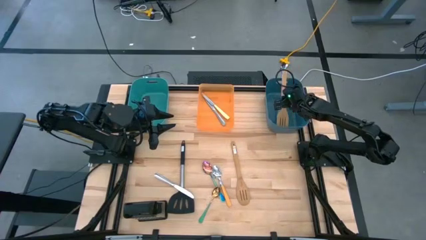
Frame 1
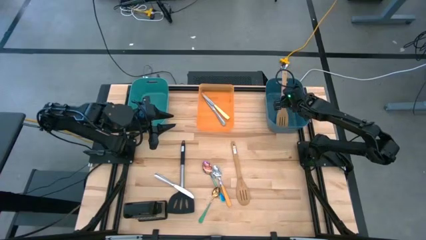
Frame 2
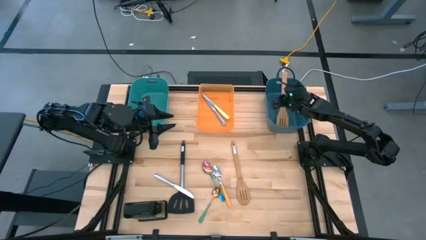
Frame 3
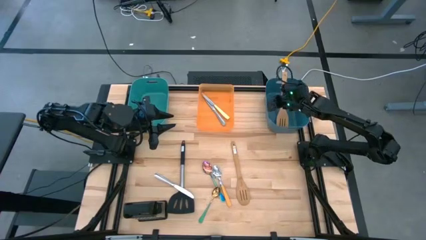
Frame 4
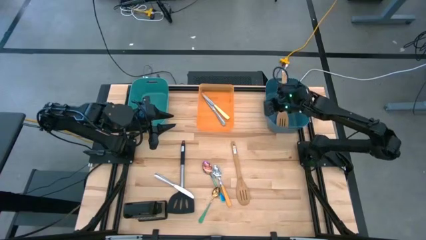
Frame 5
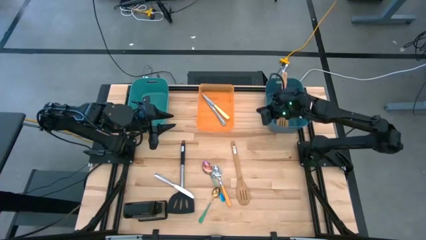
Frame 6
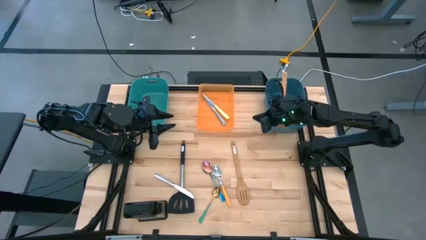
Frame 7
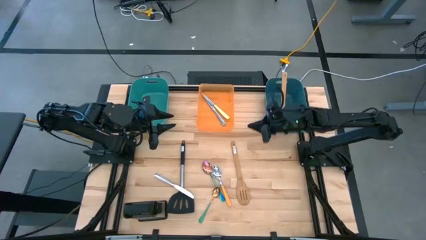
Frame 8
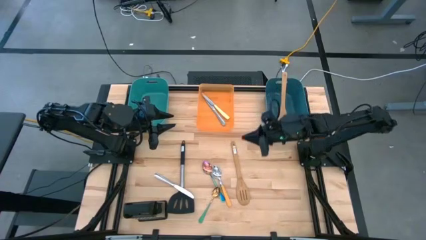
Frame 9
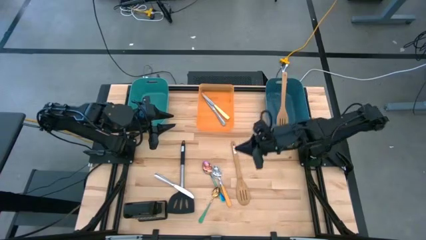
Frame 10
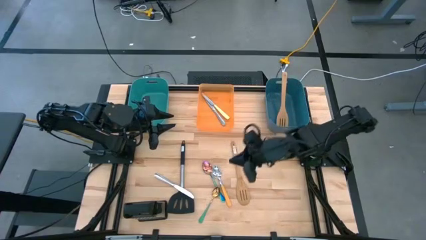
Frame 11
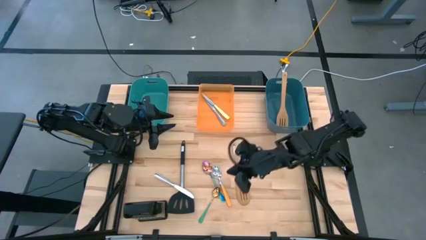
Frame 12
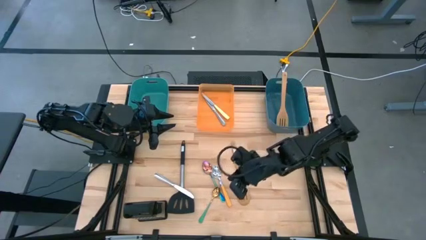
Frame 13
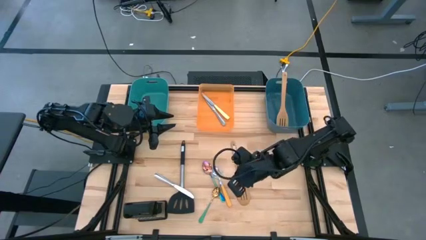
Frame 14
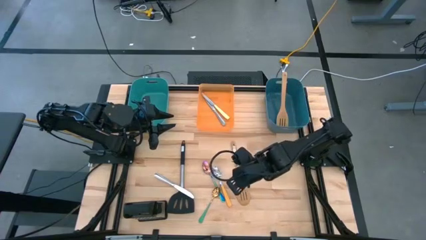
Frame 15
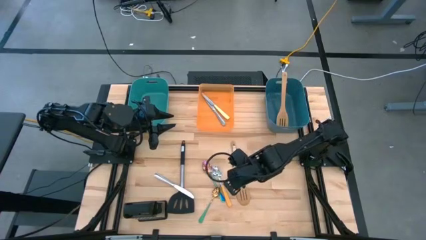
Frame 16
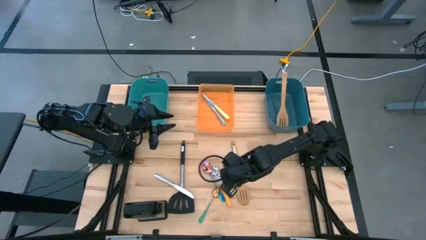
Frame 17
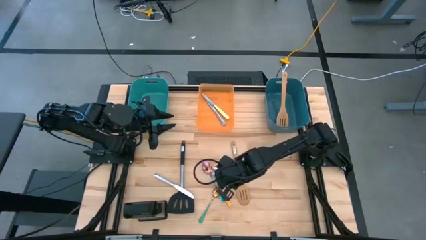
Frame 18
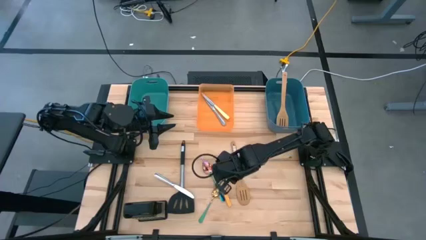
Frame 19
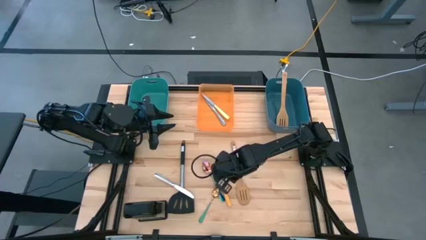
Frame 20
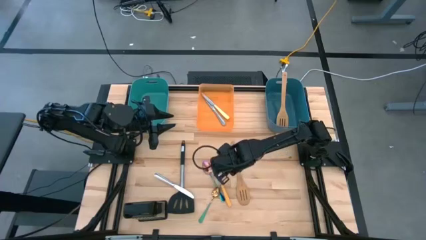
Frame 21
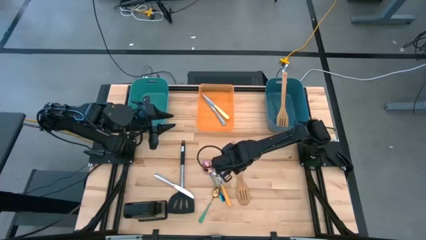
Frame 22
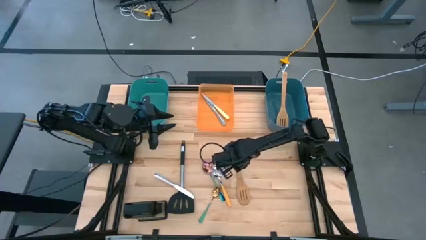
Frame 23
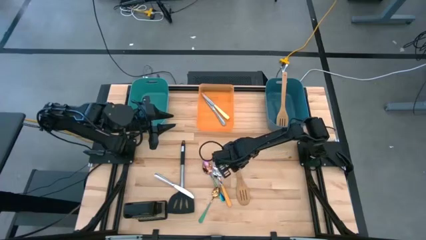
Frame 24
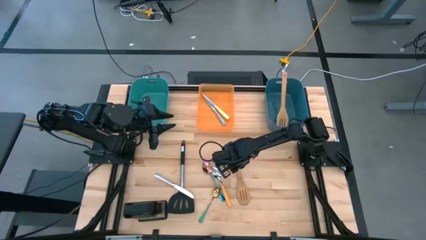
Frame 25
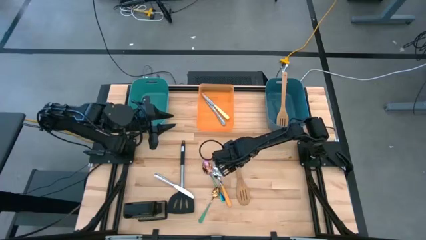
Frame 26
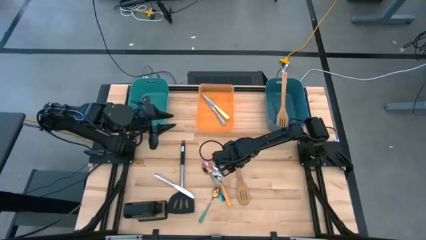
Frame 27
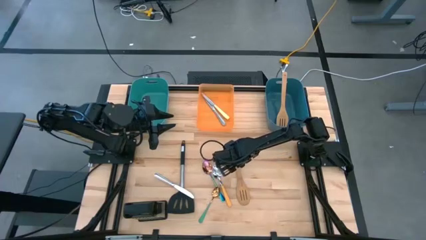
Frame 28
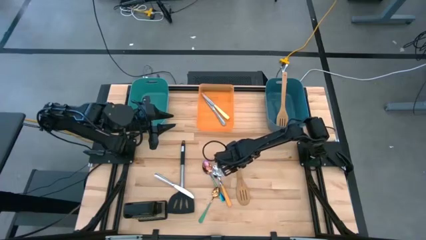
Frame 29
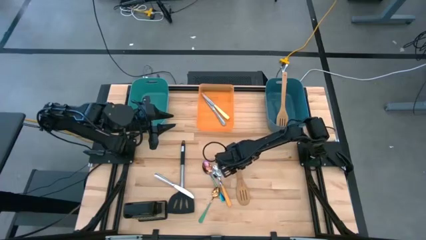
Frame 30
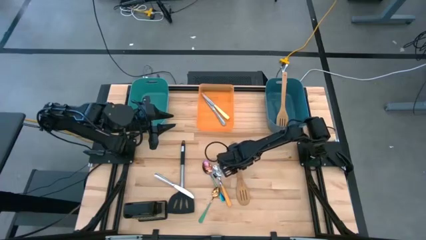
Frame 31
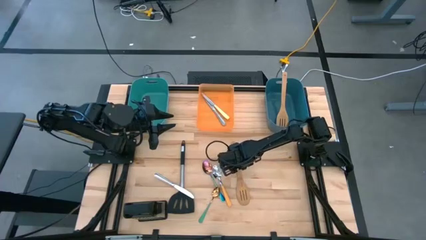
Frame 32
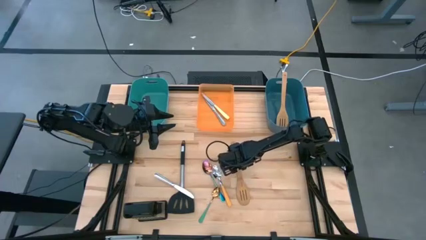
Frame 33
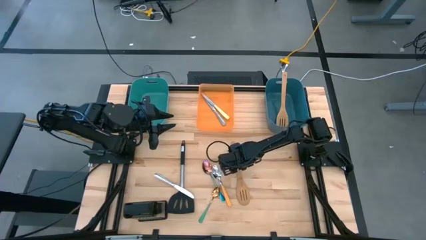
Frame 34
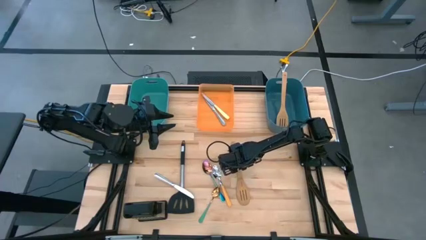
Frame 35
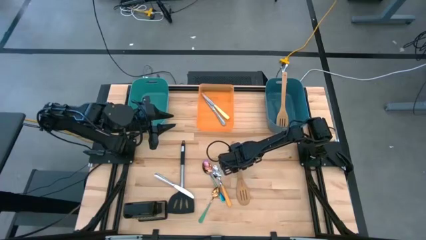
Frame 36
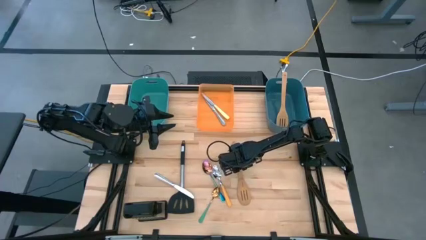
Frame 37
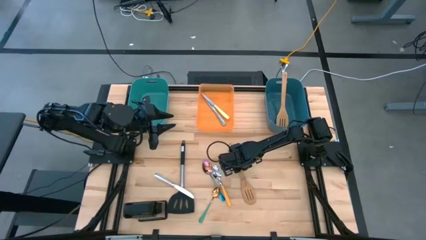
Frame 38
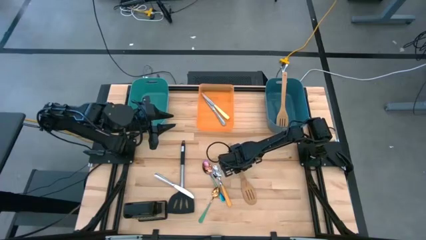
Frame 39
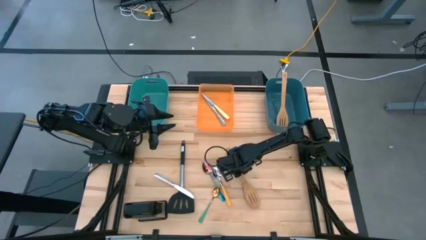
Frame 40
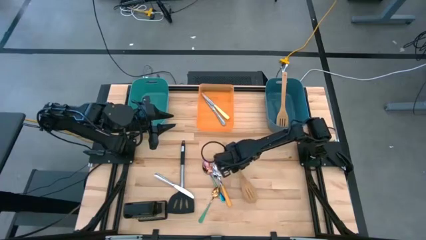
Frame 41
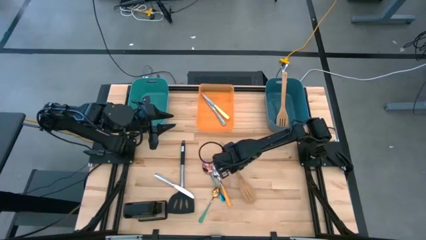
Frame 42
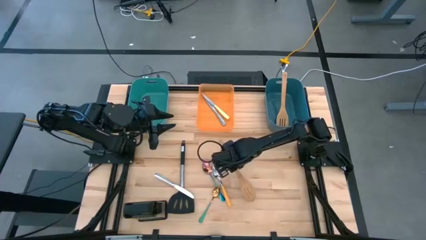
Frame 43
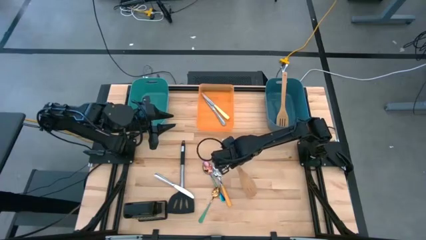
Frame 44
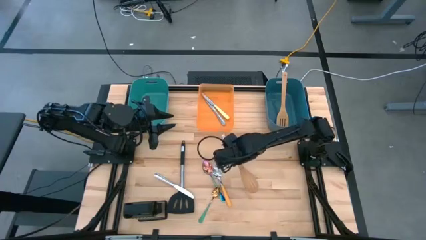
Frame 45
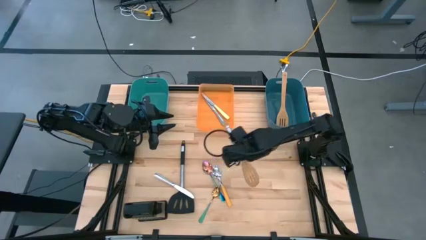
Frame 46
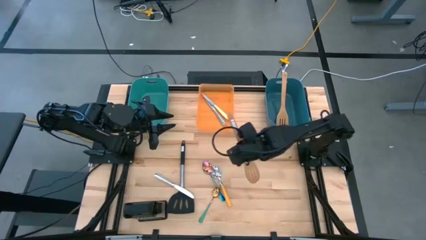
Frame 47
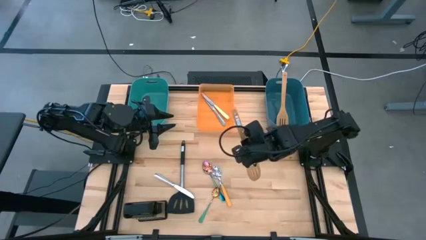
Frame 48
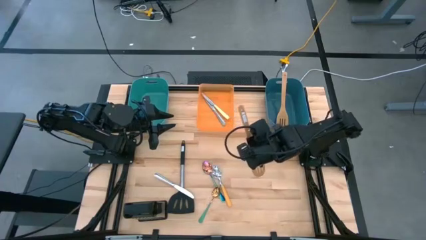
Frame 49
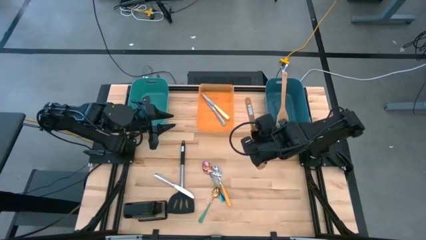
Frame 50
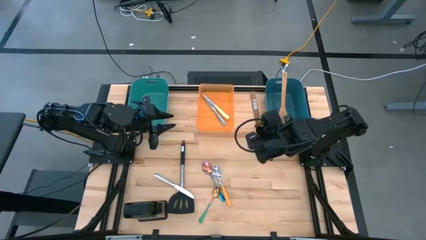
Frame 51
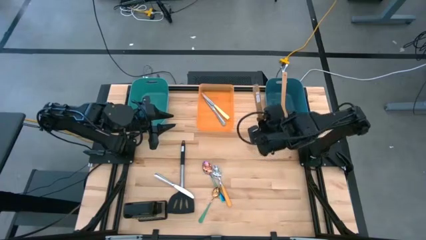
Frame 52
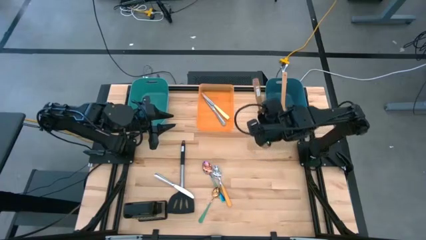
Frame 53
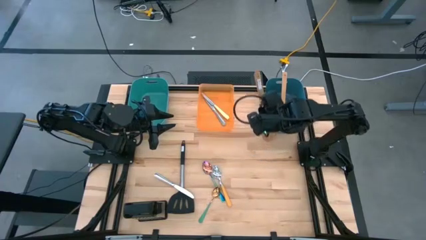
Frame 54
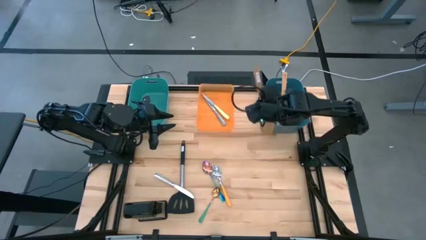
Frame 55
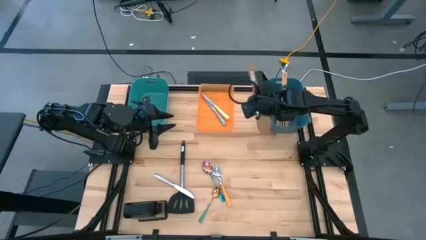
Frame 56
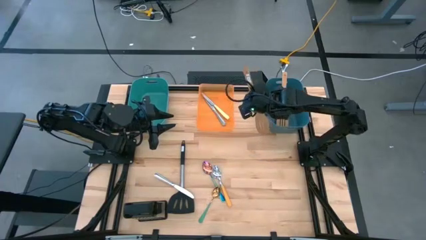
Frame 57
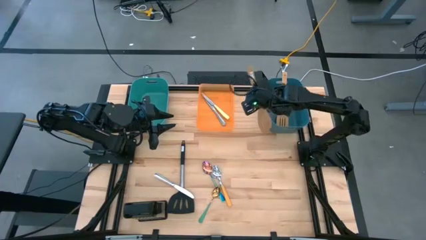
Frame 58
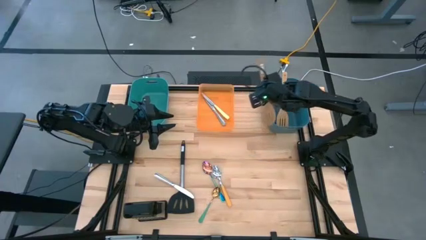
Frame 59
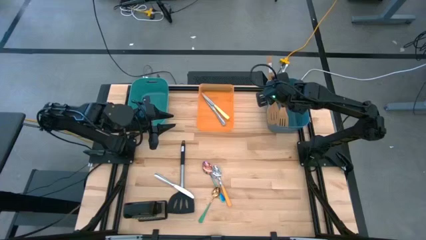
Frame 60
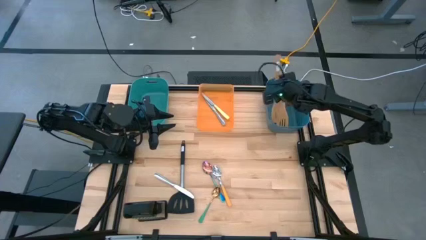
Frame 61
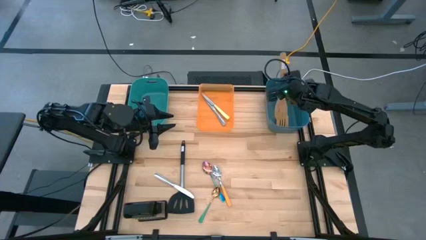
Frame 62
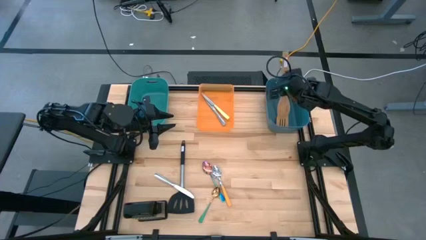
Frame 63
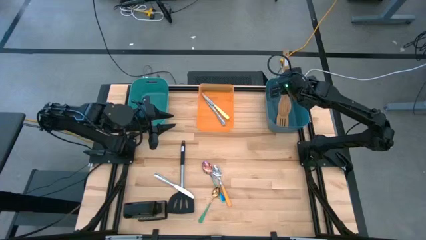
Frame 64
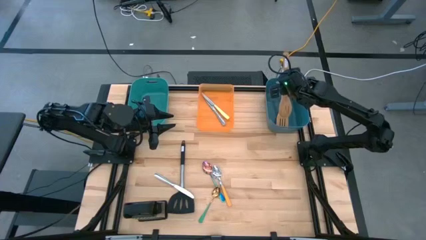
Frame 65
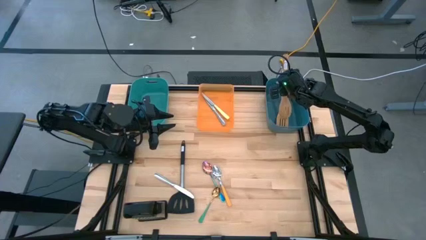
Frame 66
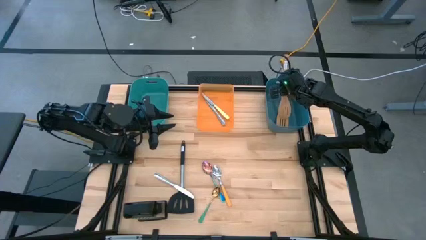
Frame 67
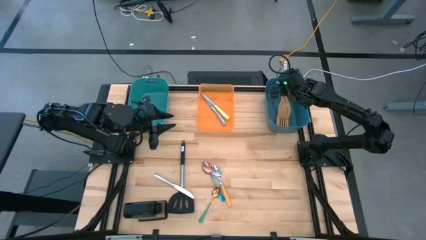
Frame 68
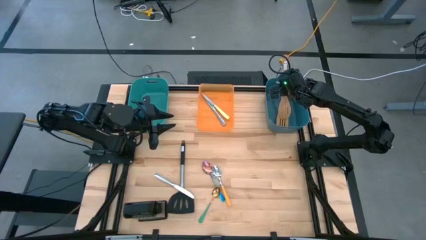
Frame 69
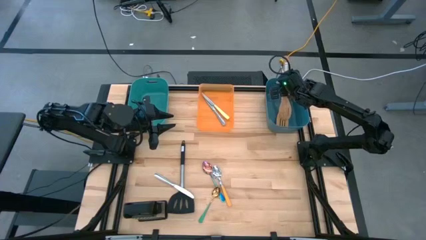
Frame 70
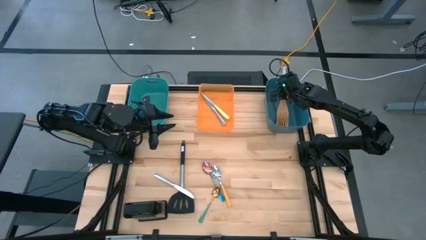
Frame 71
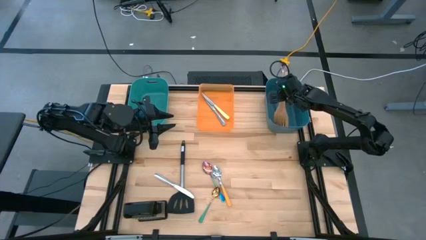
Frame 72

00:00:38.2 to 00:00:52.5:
Task: Pick & Place Kitchen Items
Put the brown spatula into the blue bin
